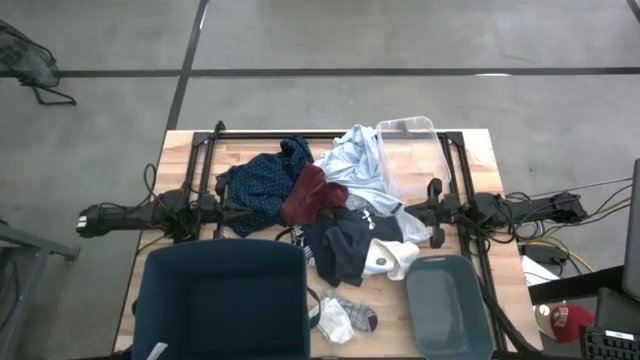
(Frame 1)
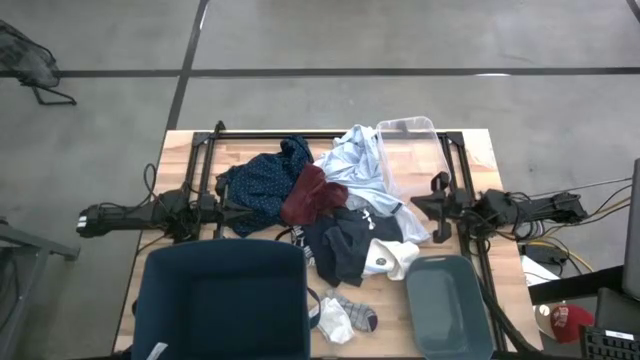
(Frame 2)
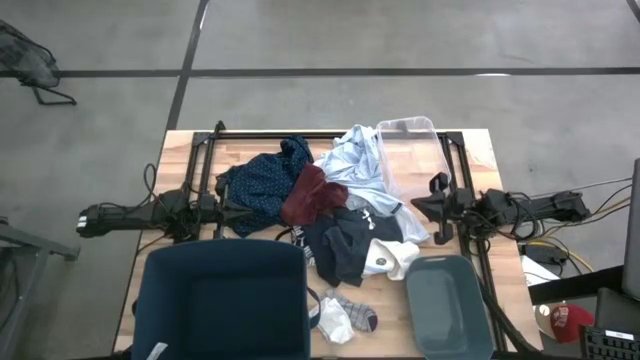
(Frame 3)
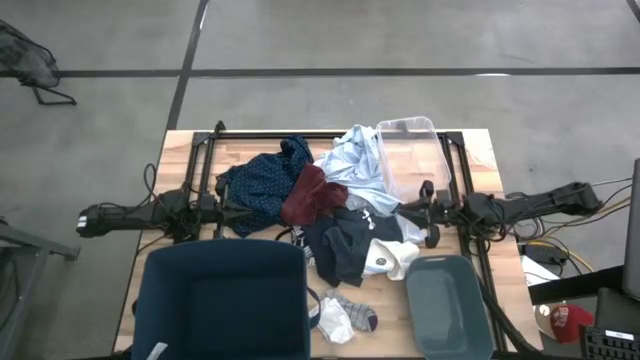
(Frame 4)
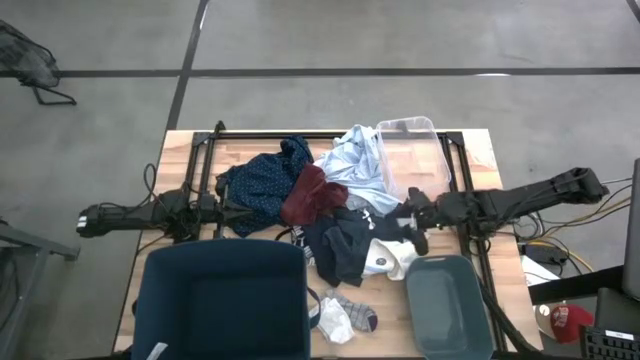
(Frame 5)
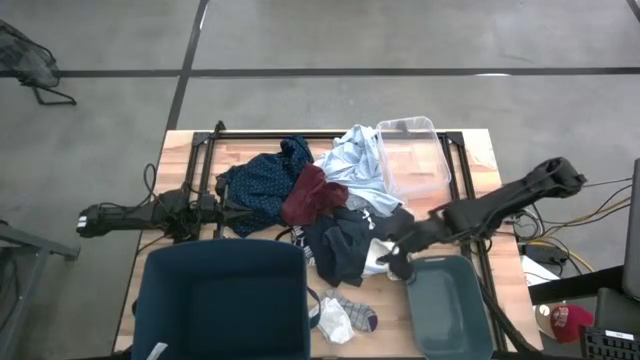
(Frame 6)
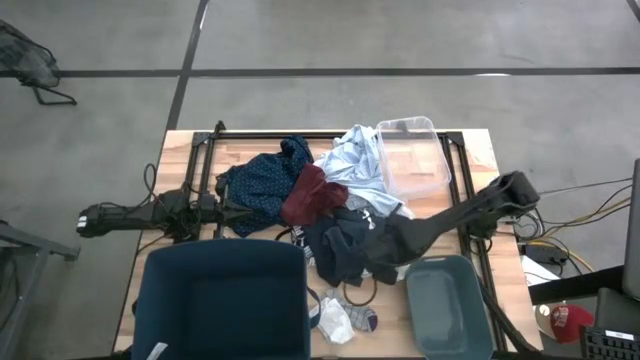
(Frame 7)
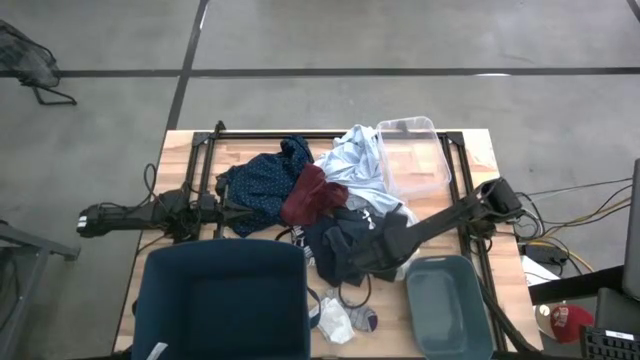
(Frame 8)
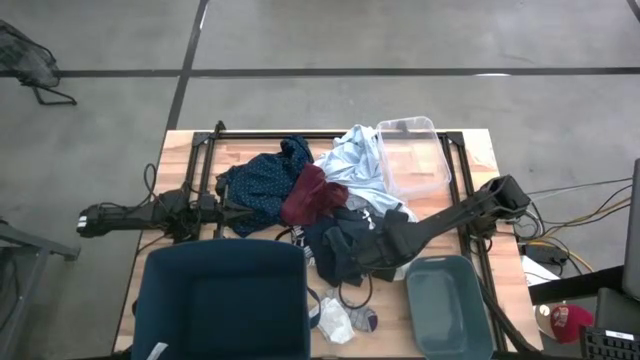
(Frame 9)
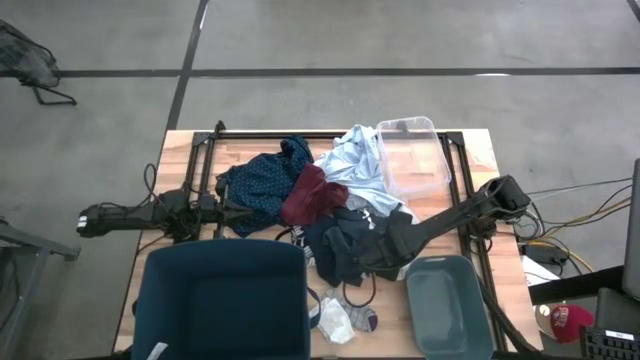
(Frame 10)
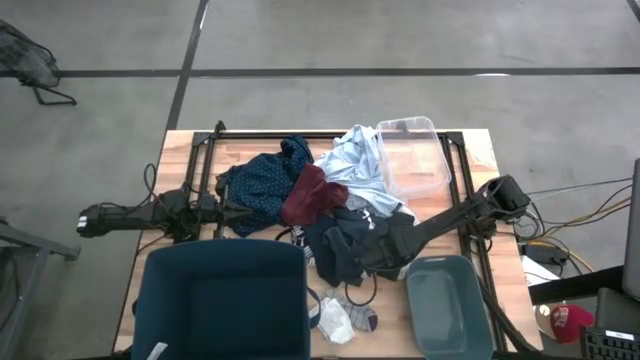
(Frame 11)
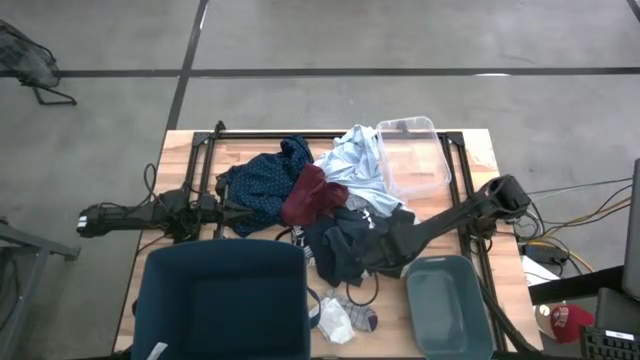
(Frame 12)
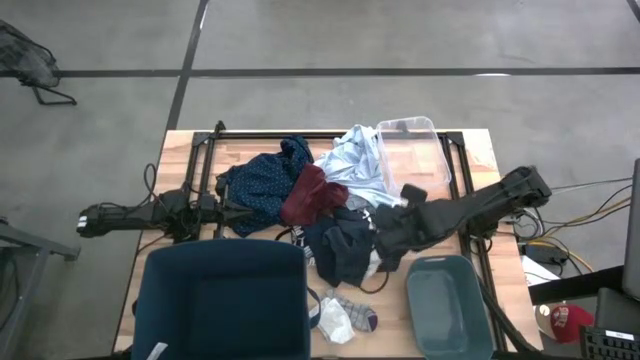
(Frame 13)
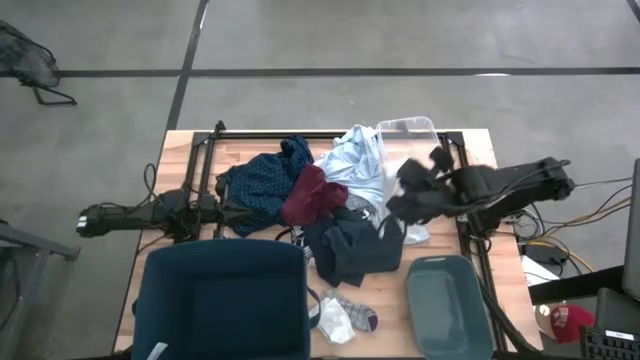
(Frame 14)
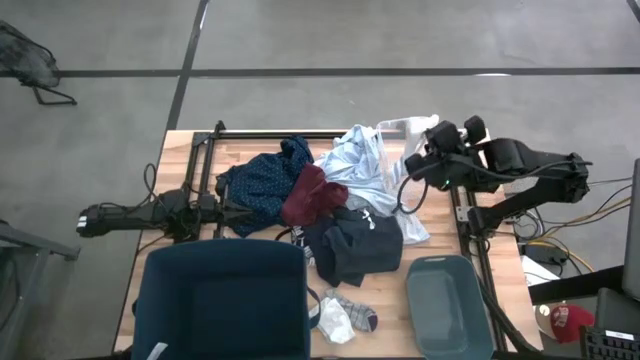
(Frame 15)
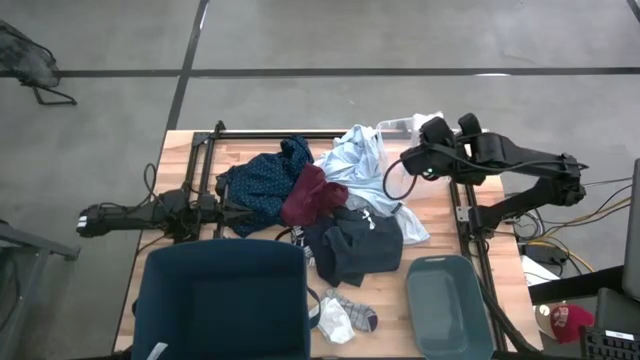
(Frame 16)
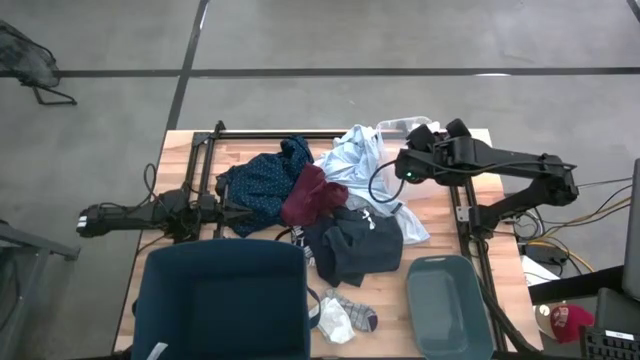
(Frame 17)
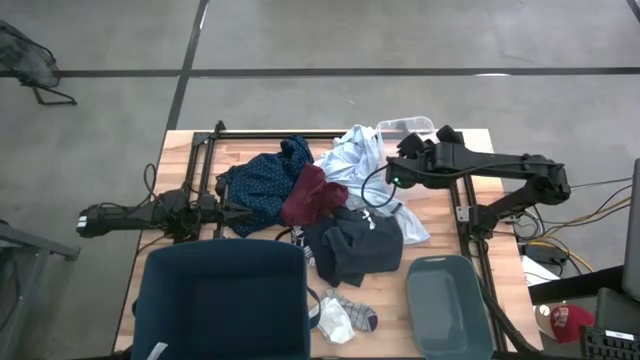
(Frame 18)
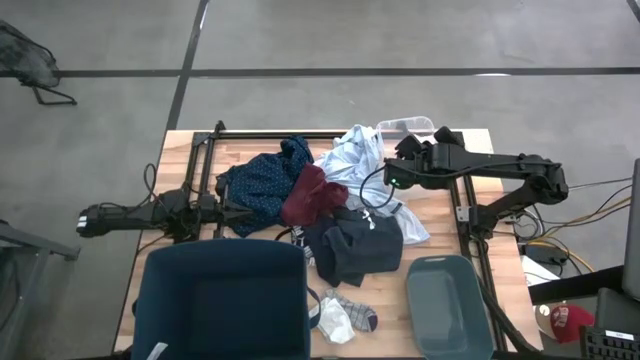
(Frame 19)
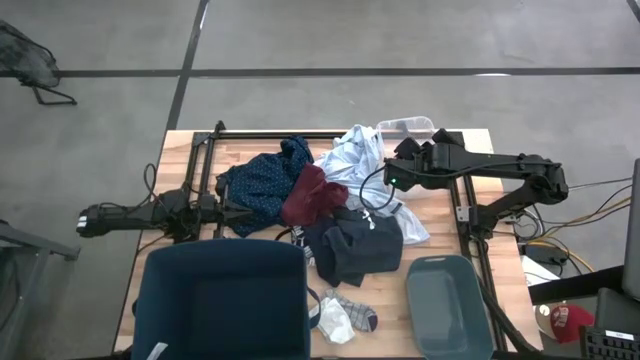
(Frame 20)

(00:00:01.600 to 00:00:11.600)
Task: Pick & Place Cloths
Put the top white sock into the transparent container

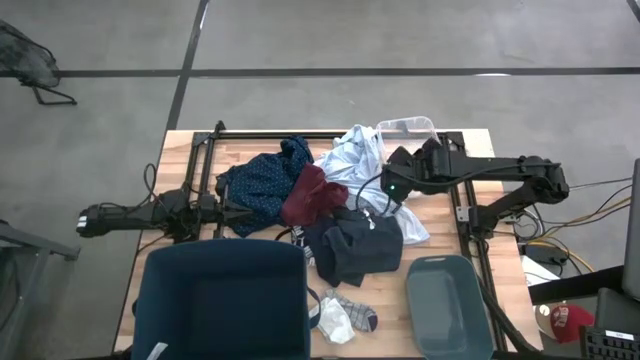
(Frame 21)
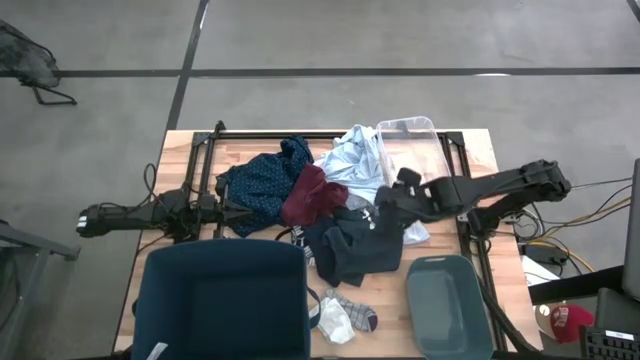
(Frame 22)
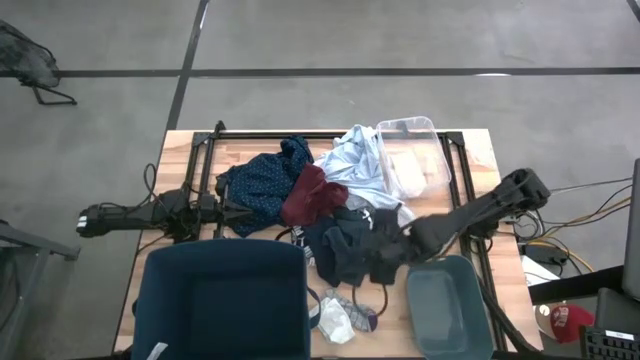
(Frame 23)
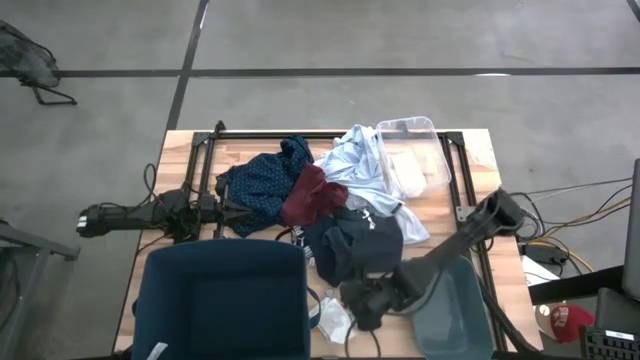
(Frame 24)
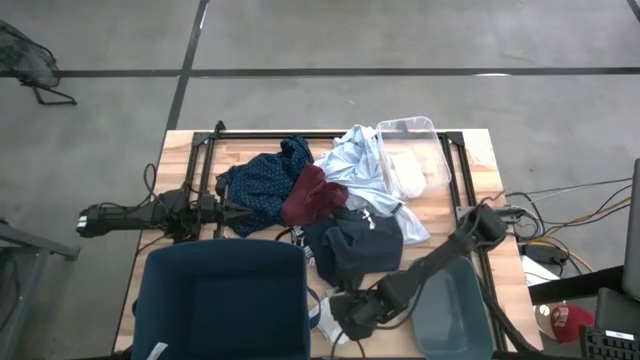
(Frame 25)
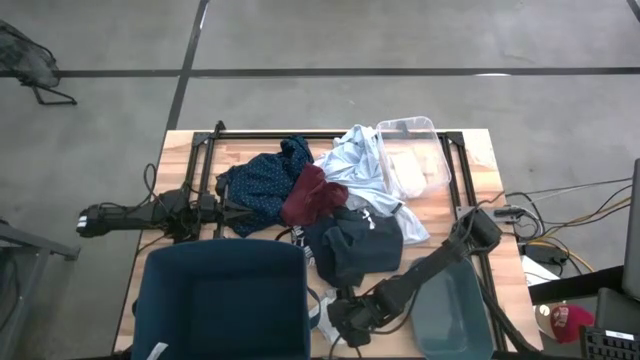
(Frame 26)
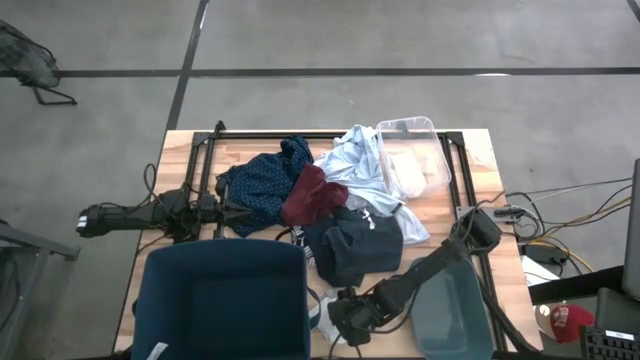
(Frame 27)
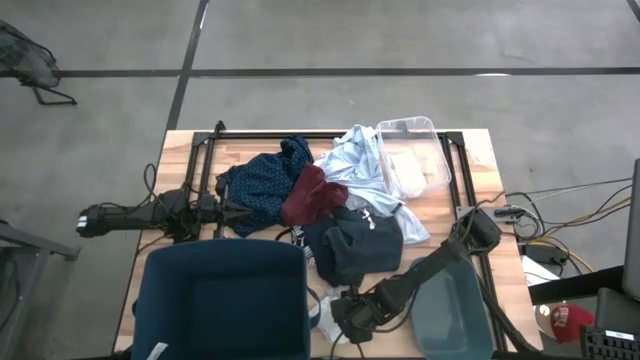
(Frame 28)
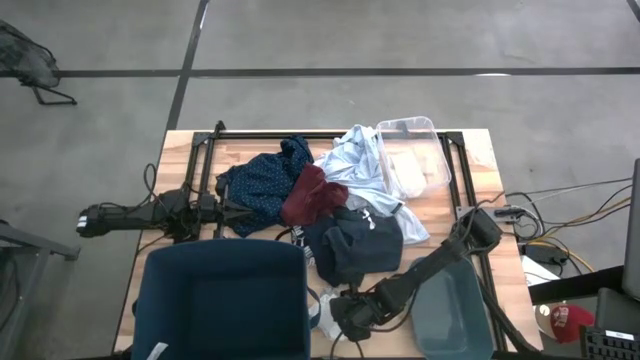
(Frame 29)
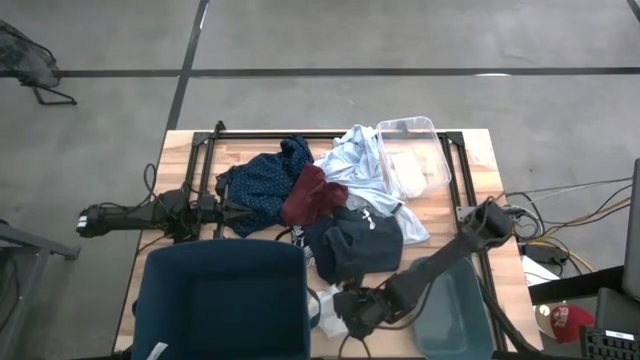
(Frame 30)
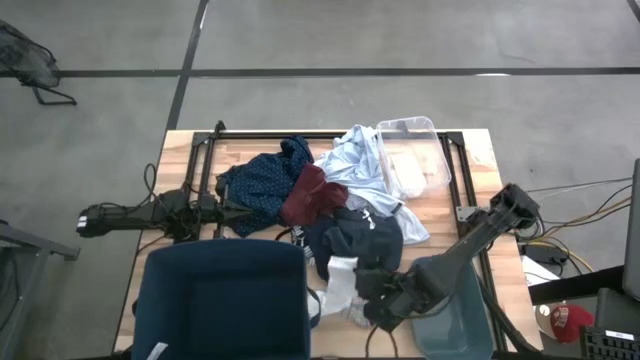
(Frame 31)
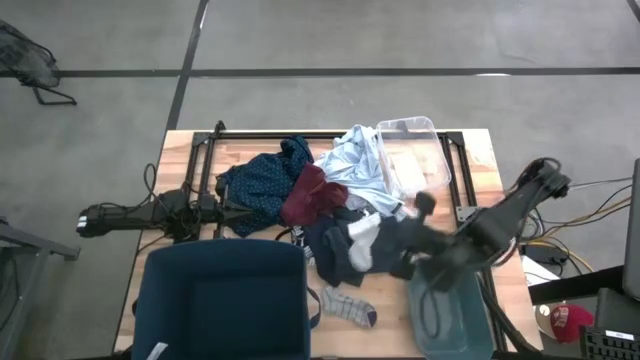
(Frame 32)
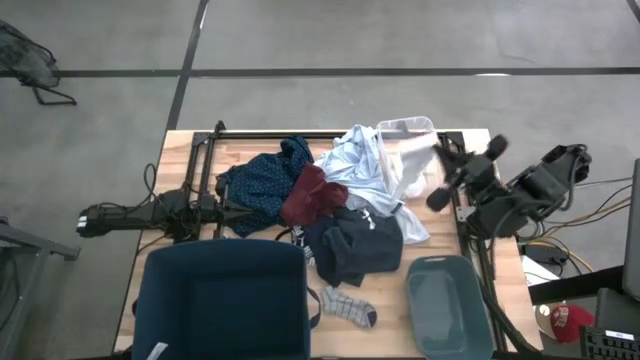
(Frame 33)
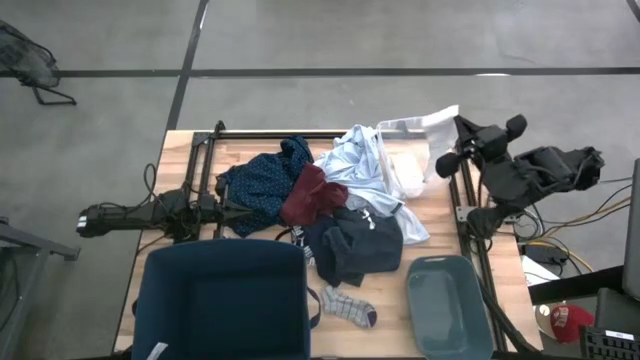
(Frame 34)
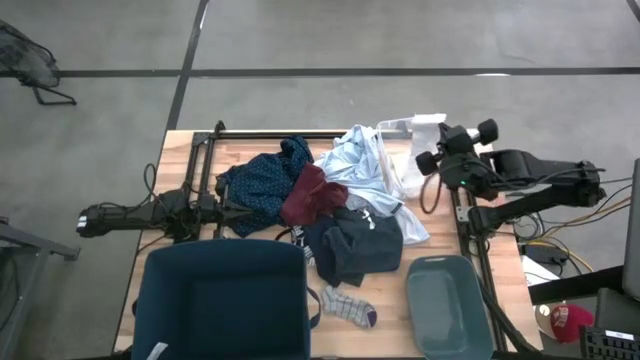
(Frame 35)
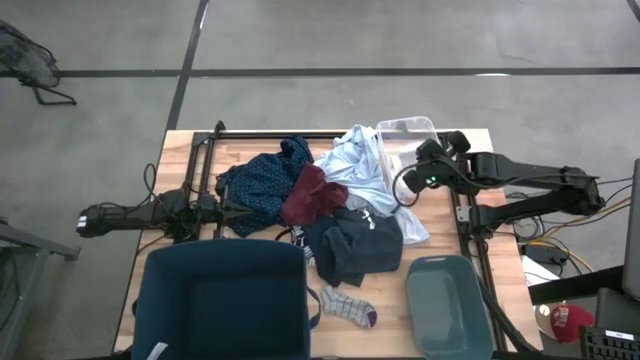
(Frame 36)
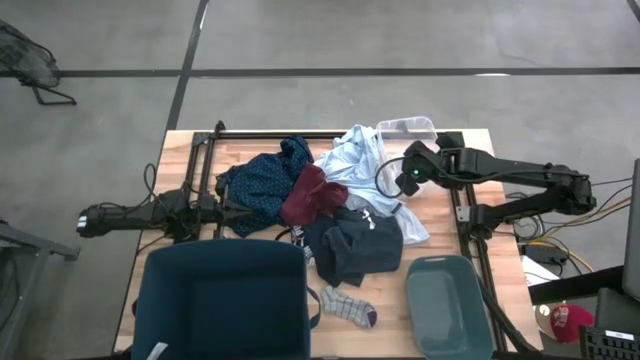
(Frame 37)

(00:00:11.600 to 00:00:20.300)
Put the white sock into the transparent container

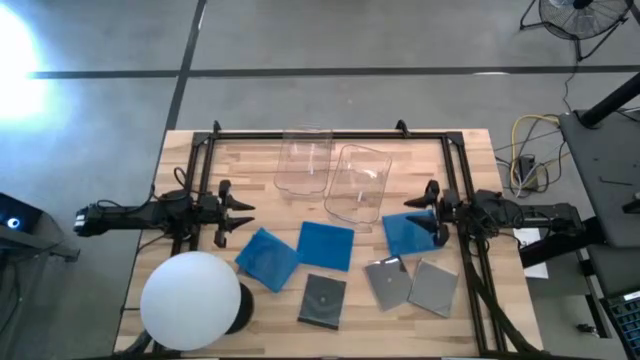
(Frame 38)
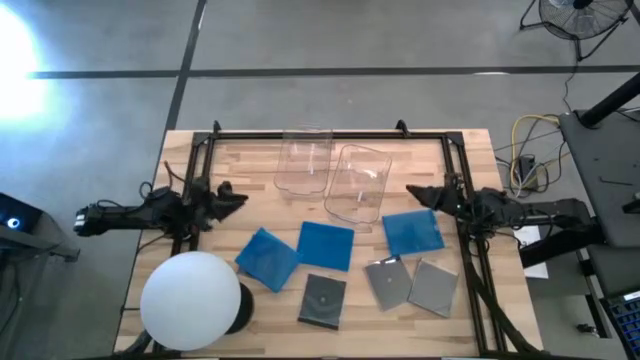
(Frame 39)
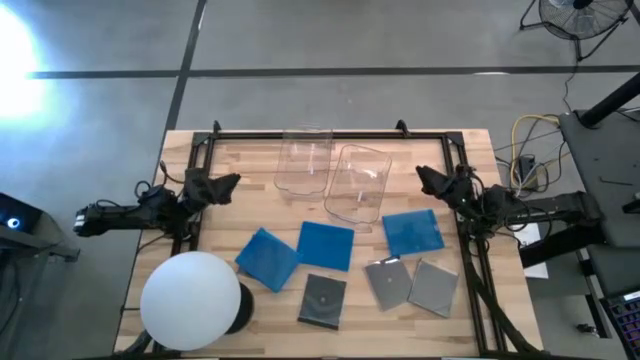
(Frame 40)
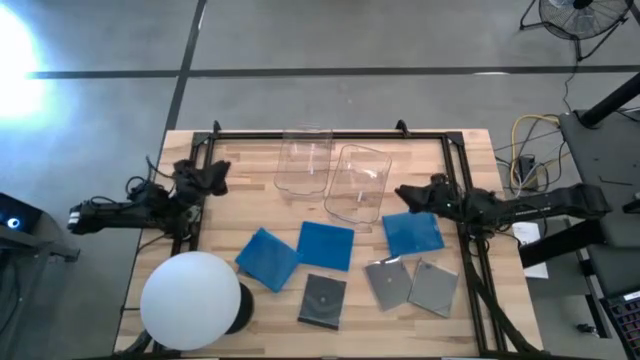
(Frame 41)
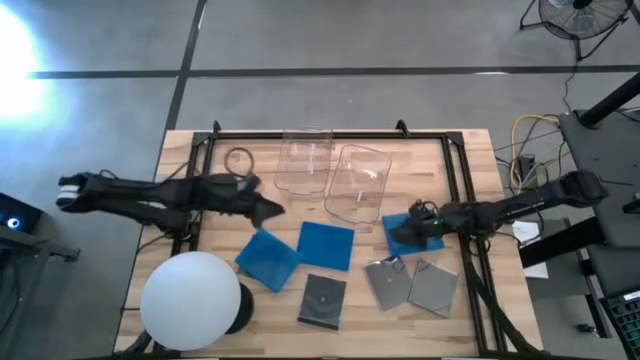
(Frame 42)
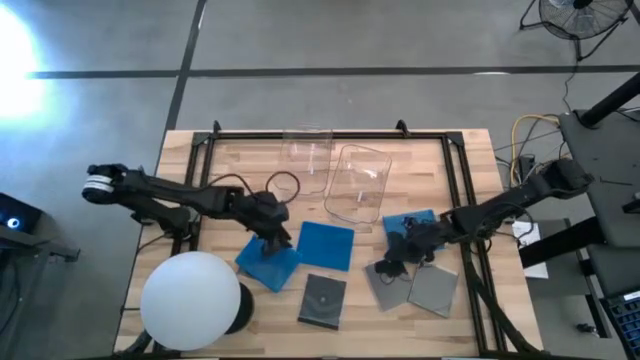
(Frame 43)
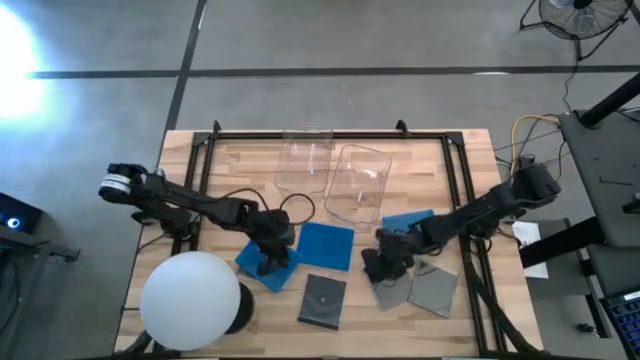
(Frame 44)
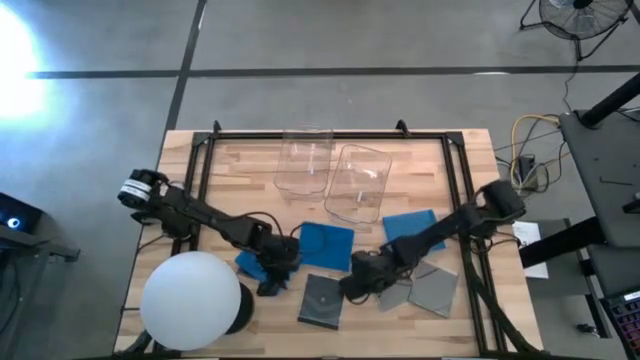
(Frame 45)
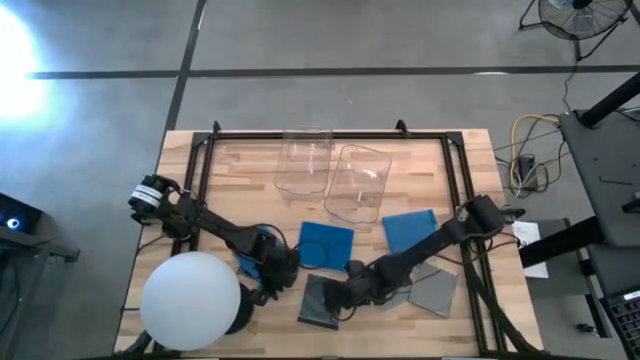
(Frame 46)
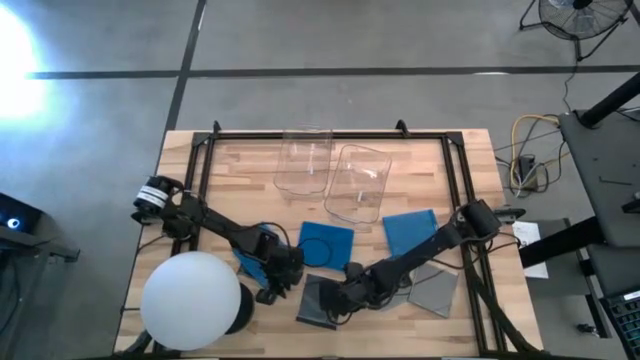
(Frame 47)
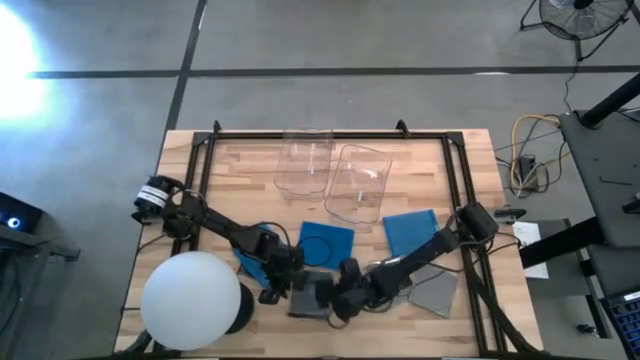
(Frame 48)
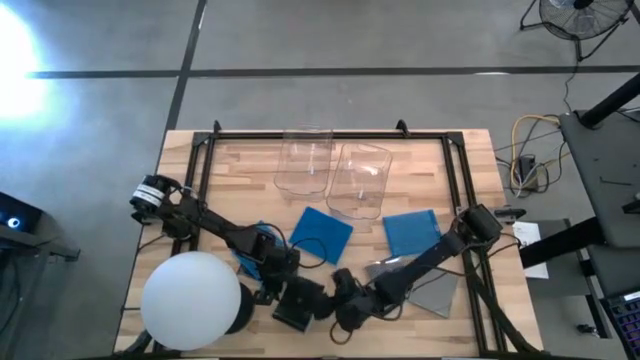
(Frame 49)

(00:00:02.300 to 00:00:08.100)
Task: Pick & place jewel cases by type
Put the black CD case into the right transparent bin
